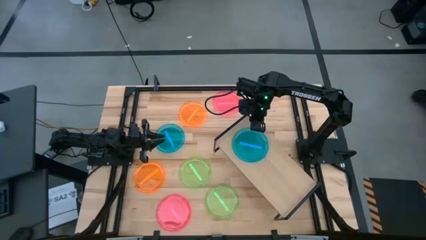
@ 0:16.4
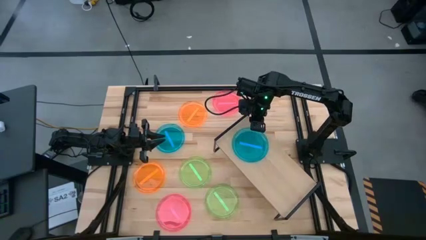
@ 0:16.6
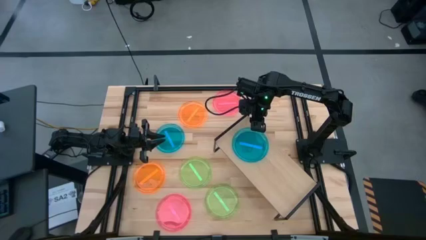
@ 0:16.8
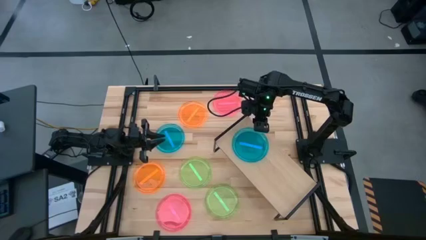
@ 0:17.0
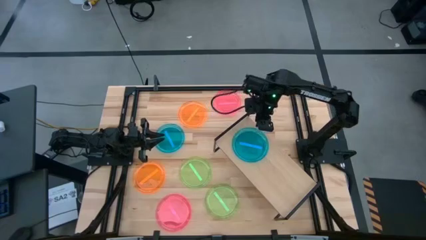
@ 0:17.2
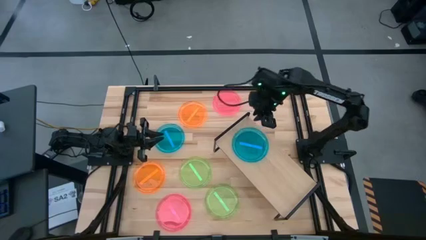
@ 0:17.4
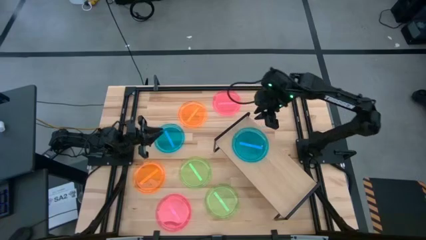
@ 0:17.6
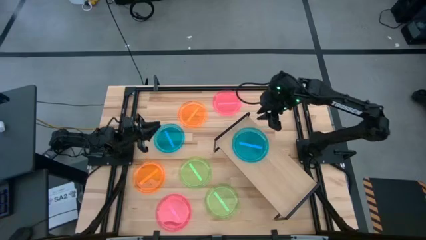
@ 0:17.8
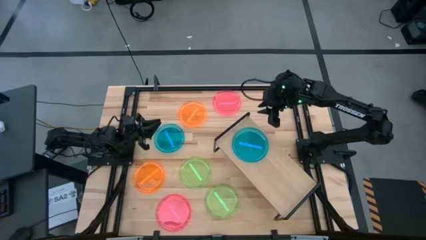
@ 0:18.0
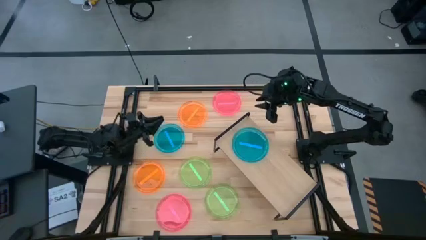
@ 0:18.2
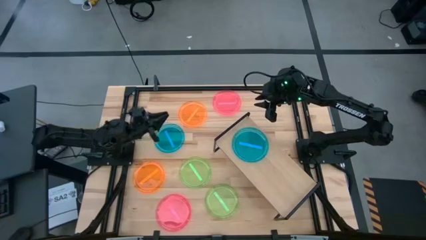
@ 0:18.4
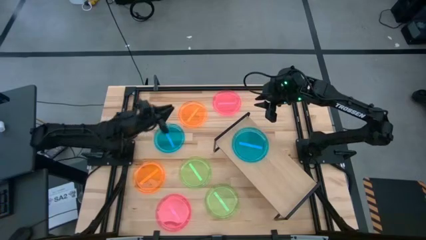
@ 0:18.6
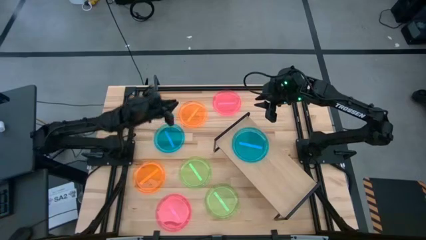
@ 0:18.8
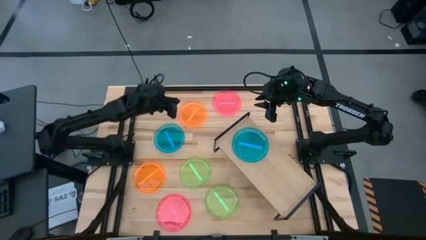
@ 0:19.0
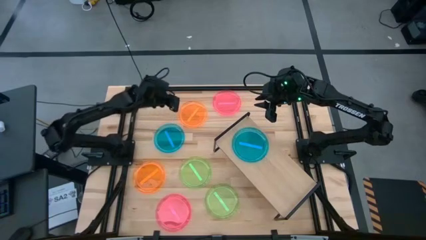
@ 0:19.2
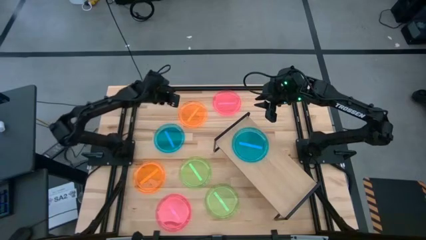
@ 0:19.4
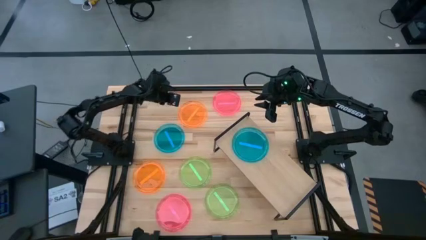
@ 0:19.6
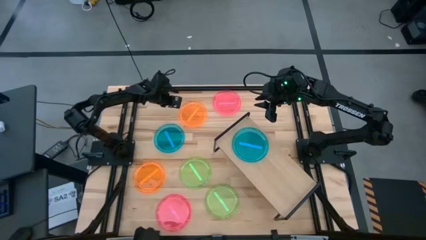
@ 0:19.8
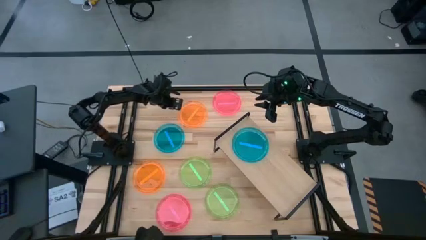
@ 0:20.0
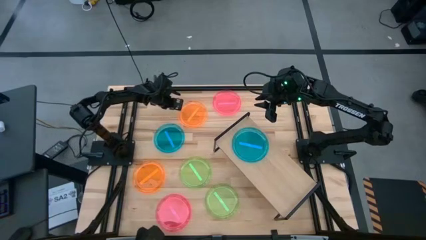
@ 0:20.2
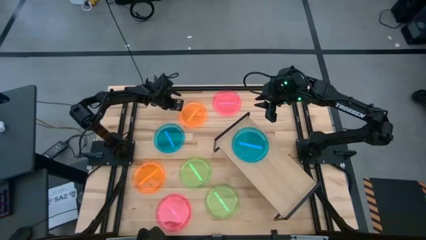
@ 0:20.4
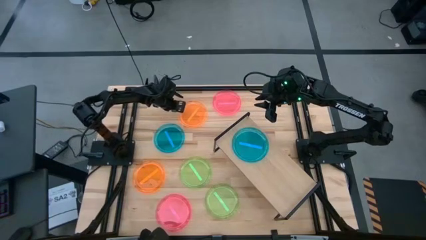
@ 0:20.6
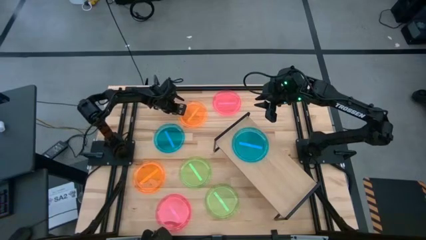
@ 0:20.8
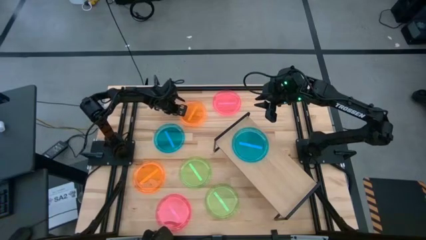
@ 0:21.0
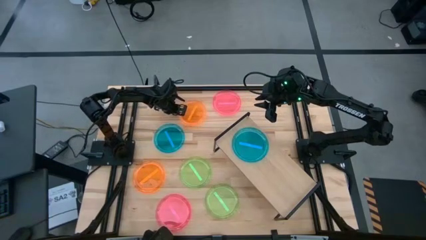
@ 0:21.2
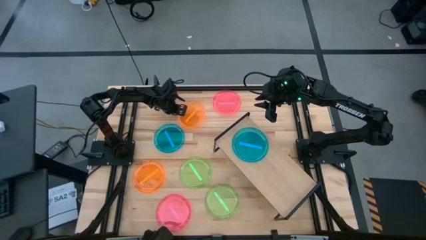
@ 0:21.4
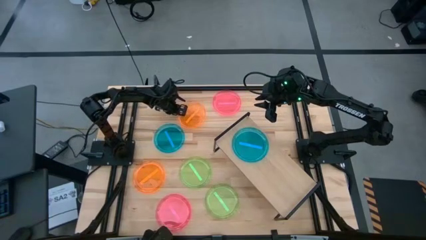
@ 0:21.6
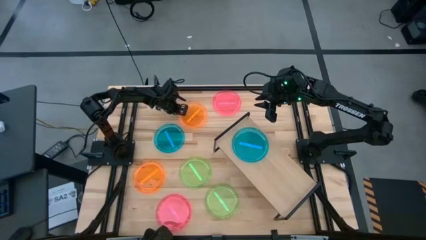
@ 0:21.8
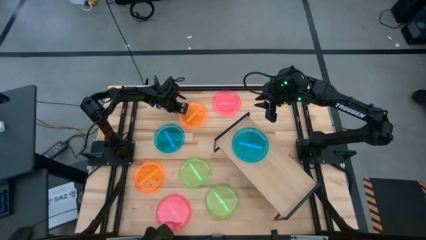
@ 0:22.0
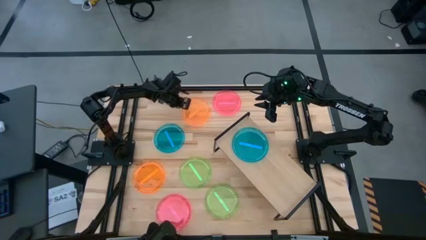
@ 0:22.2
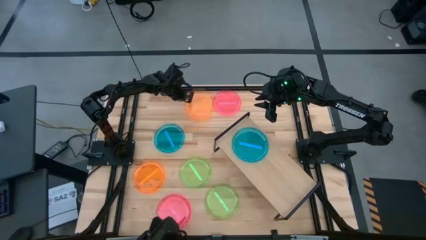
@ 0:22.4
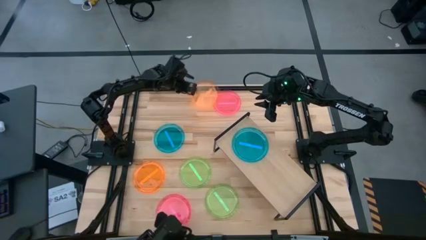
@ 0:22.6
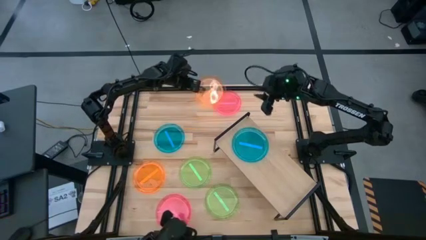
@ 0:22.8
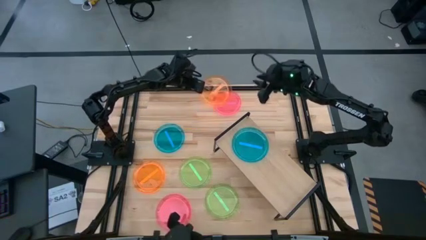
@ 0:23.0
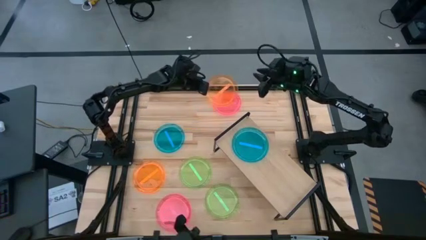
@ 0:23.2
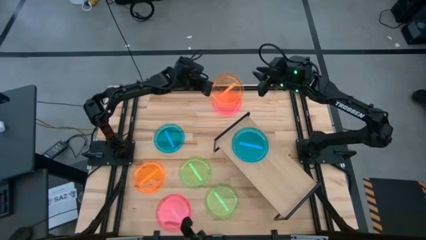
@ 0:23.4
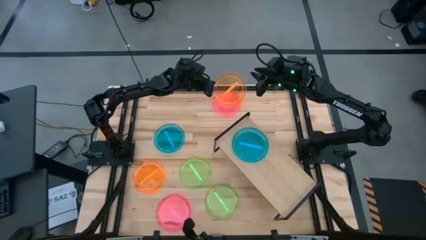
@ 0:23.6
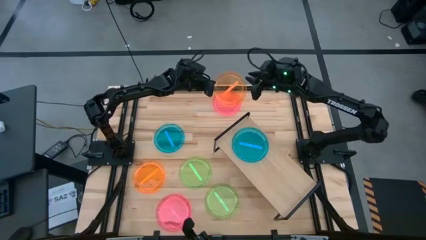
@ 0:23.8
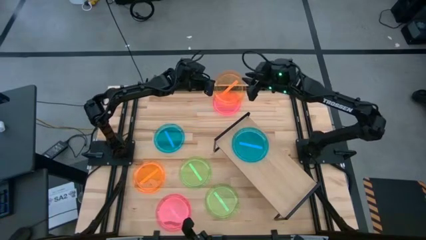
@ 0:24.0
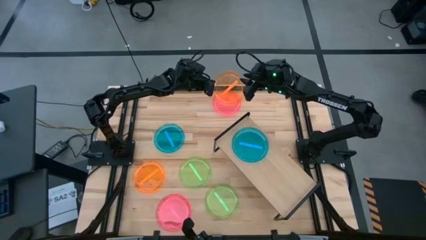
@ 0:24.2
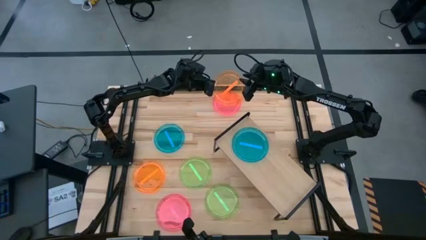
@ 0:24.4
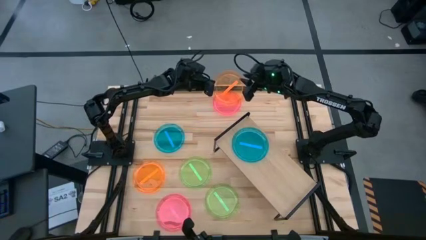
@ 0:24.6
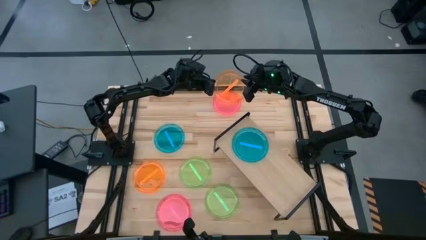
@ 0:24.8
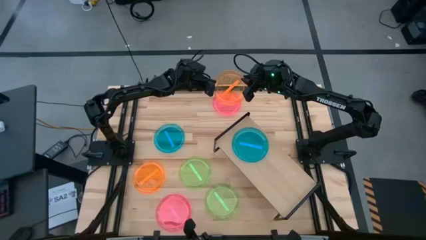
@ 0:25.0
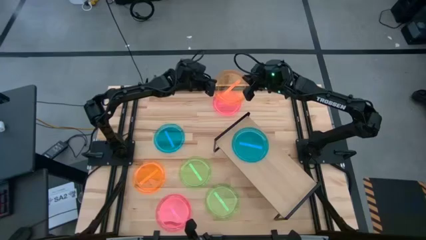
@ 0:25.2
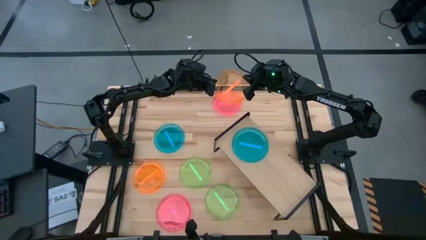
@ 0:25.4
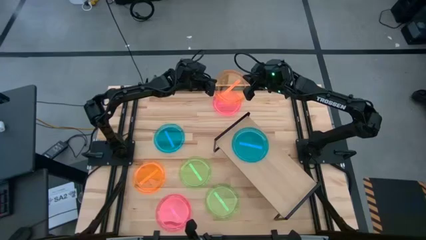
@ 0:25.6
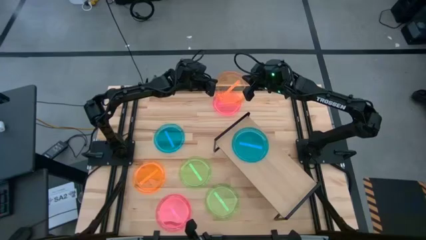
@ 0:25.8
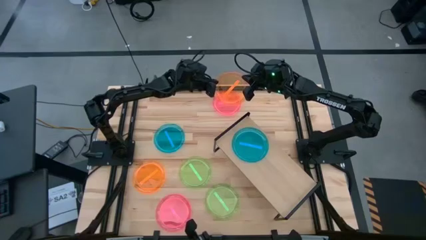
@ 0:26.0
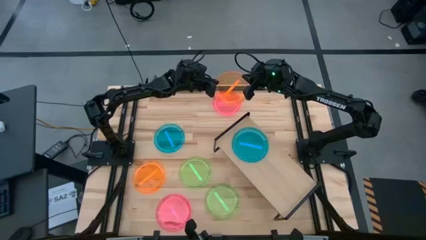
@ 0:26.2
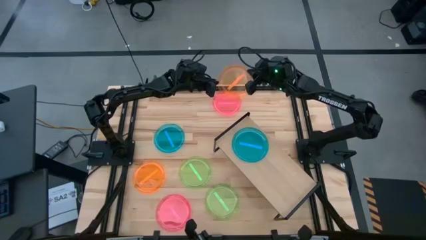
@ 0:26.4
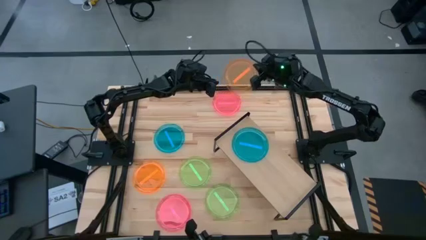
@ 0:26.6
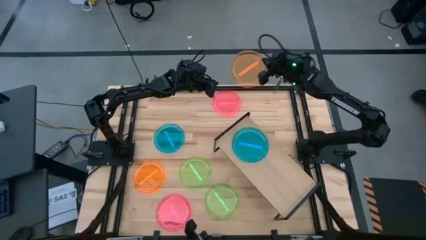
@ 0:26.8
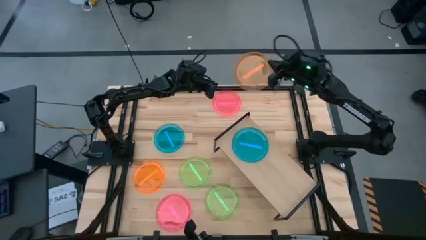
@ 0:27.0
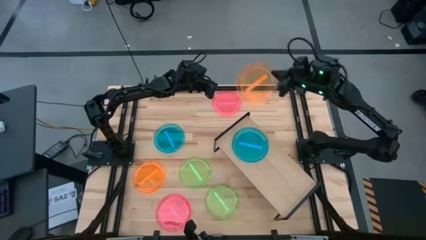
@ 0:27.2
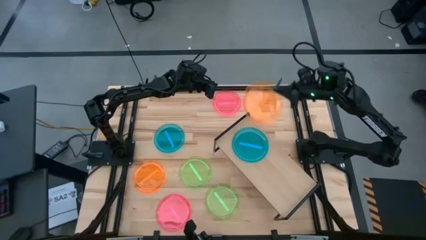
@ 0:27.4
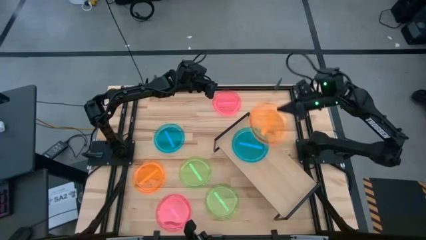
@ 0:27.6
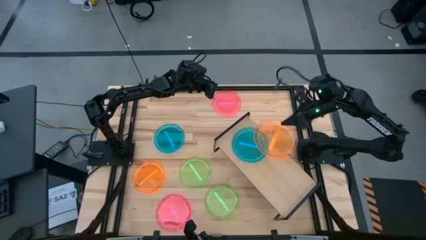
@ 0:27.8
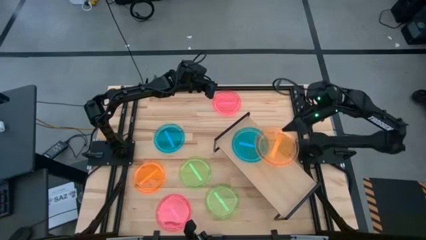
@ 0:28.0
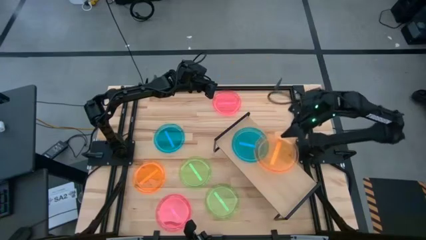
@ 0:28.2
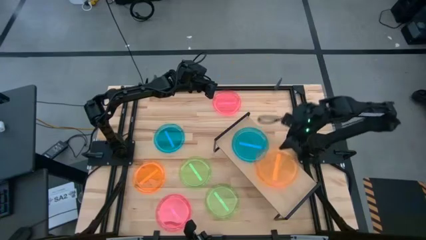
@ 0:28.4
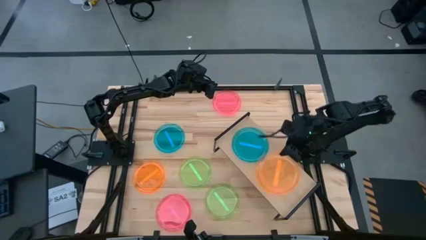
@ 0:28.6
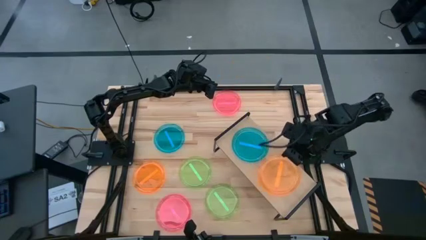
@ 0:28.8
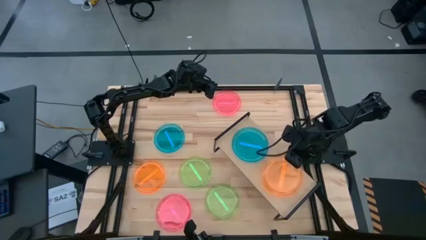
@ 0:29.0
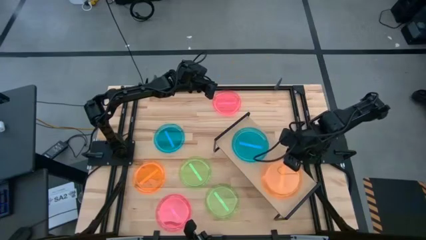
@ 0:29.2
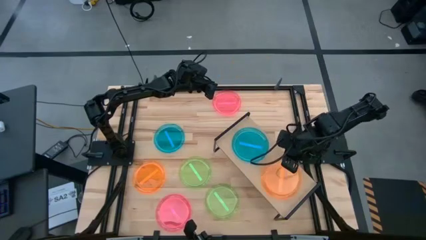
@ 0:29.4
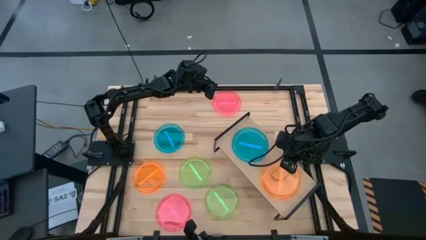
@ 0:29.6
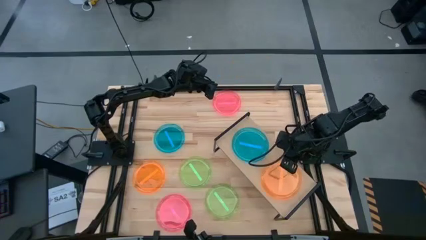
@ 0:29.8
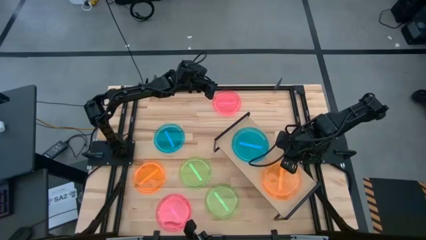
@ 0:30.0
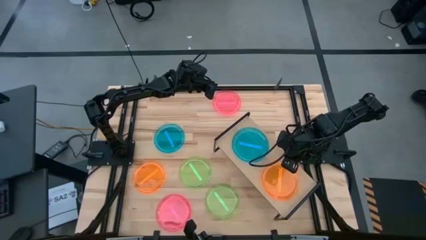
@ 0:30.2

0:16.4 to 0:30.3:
Task: Place and stack plates onto a shelf
Put the top orange plate on the shelf

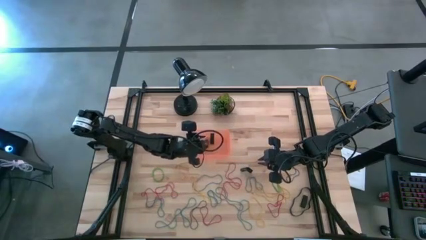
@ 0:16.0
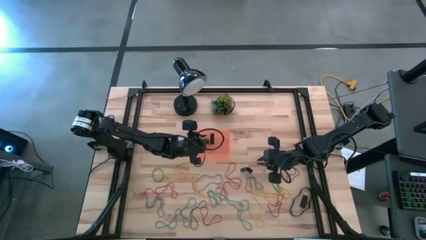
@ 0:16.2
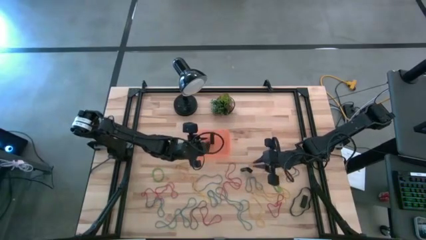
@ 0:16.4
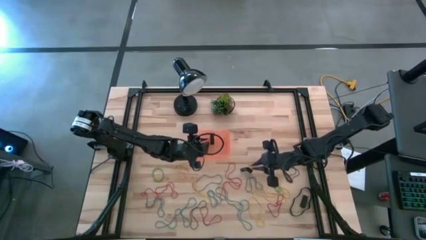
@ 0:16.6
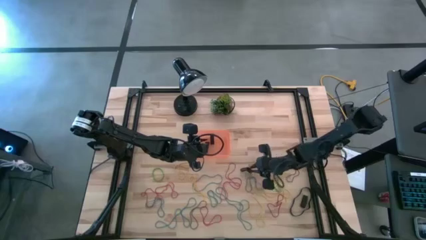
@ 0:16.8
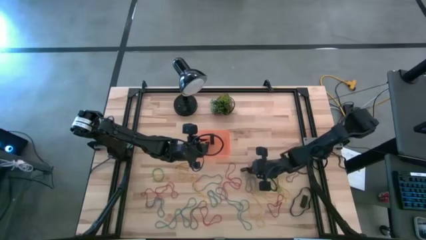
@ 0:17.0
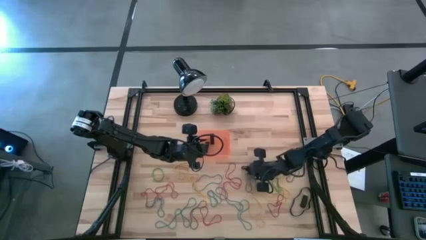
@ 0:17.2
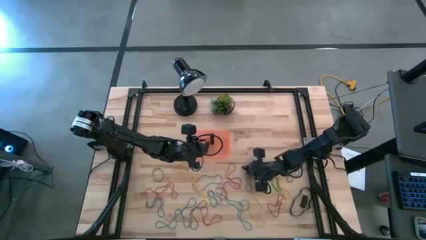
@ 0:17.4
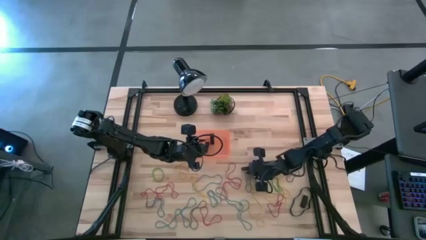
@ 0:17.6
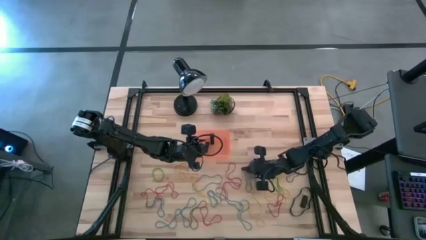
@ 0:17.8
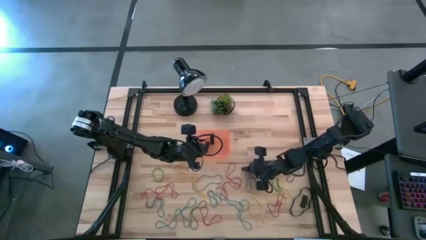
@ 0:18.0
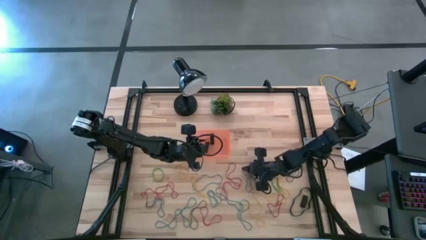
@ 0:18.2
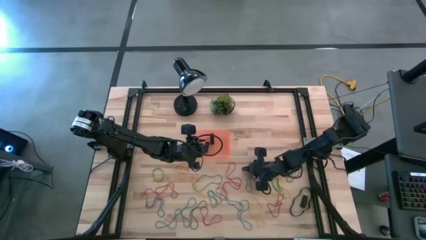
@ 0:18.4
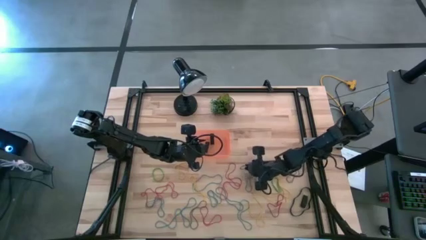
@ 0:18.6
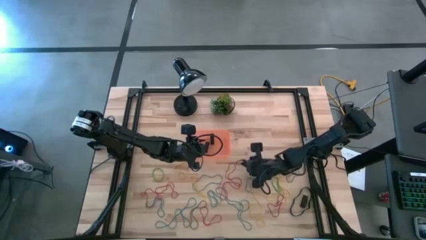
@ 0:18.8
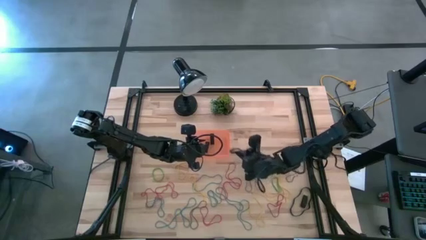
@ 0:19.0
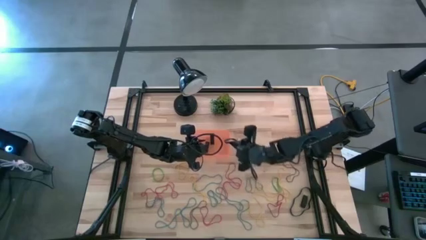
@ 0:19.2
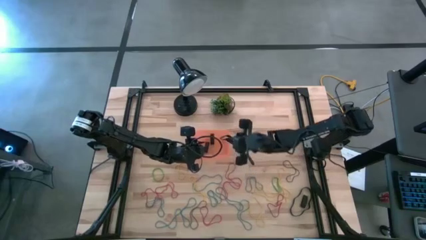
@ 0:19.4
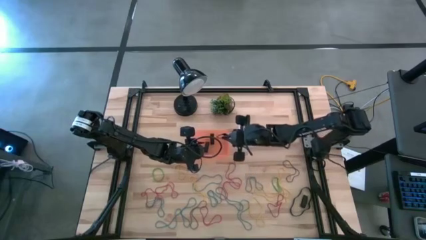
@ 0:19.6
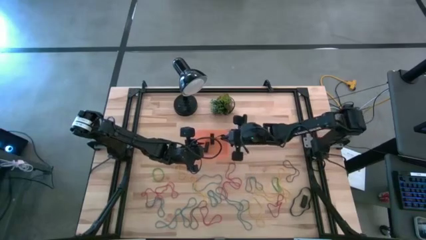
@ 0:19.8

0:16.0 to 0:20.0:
Task: Pick and place rubber bands into bin
Put the black rubberband into the orange bin
